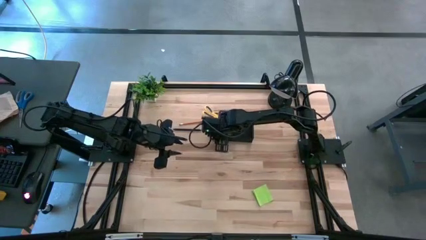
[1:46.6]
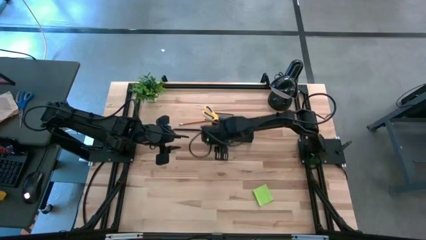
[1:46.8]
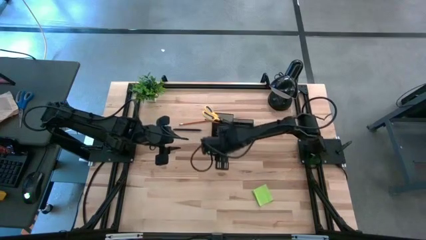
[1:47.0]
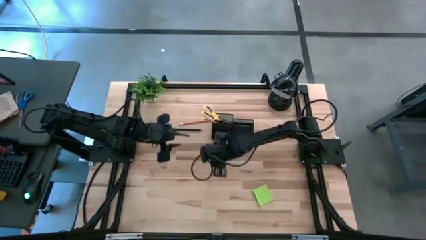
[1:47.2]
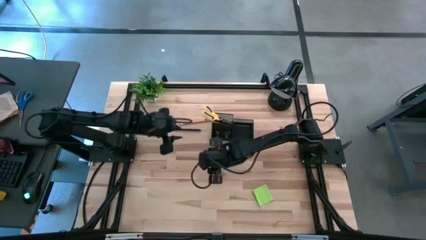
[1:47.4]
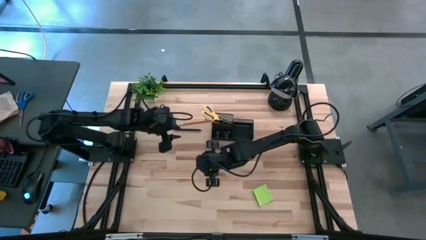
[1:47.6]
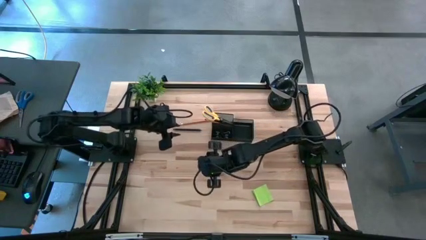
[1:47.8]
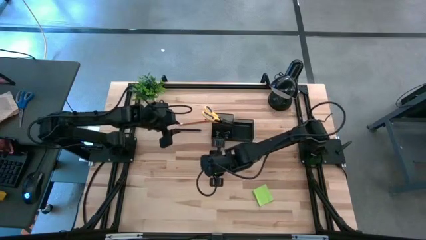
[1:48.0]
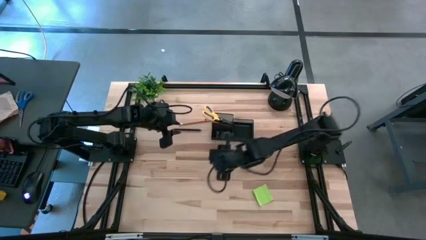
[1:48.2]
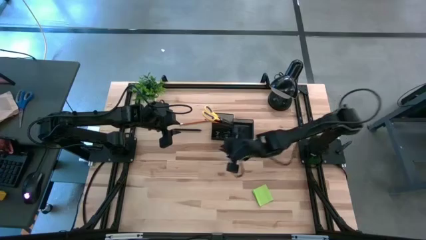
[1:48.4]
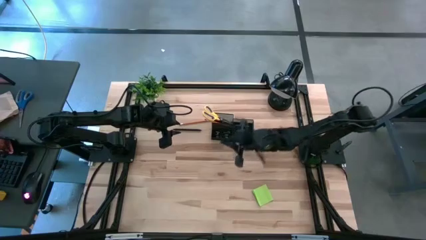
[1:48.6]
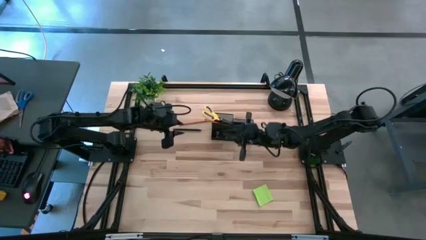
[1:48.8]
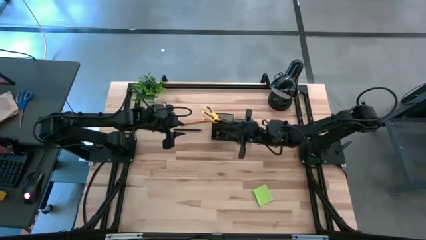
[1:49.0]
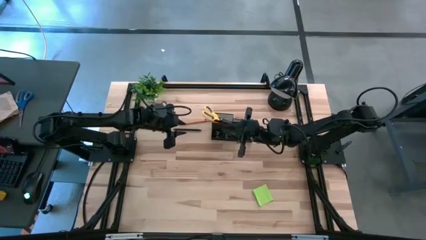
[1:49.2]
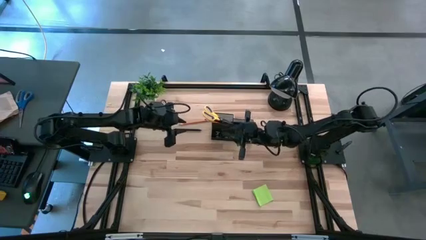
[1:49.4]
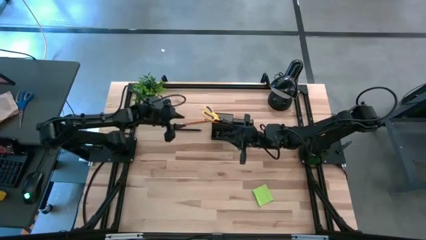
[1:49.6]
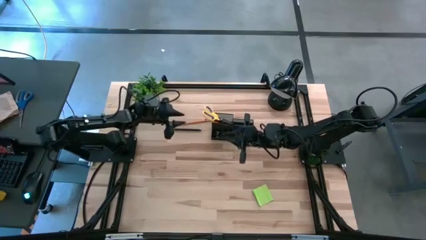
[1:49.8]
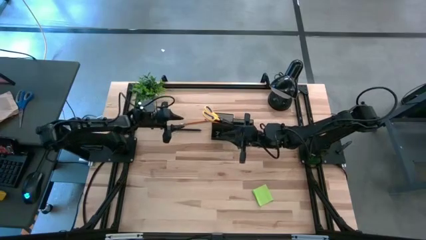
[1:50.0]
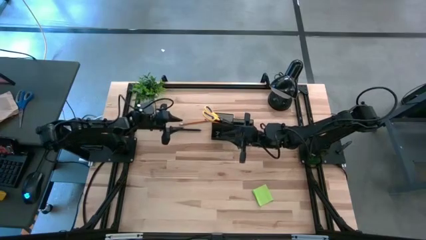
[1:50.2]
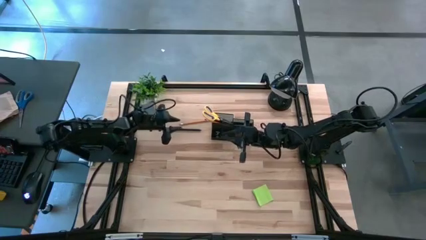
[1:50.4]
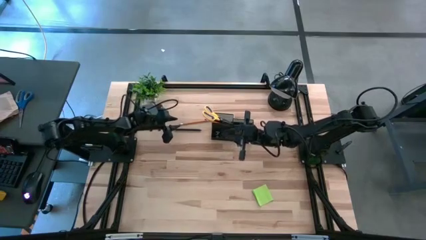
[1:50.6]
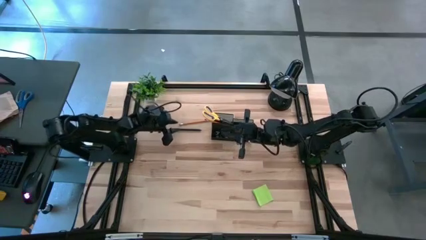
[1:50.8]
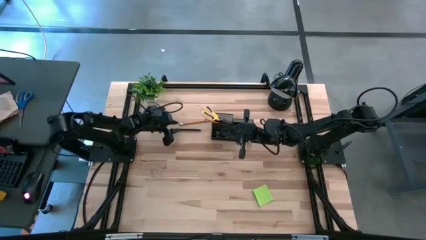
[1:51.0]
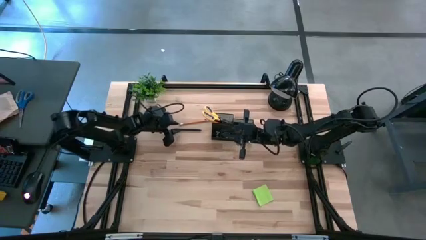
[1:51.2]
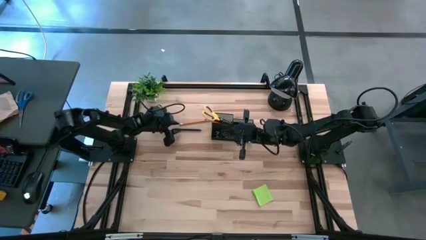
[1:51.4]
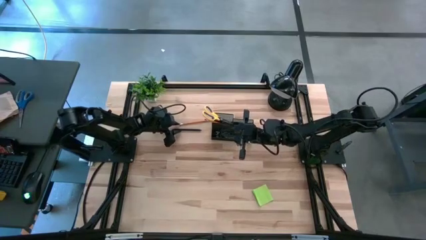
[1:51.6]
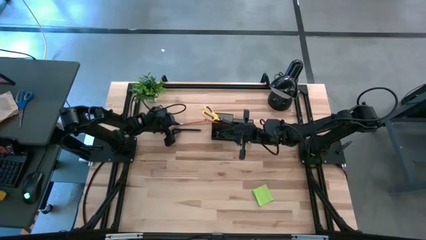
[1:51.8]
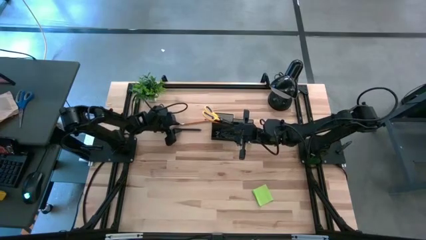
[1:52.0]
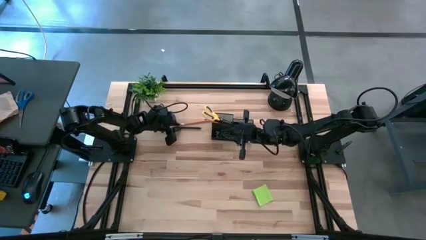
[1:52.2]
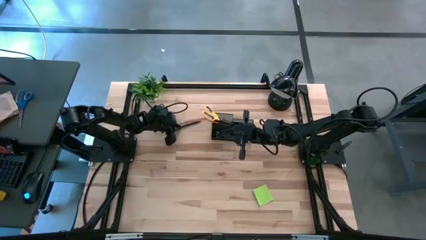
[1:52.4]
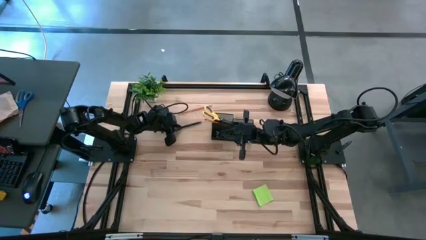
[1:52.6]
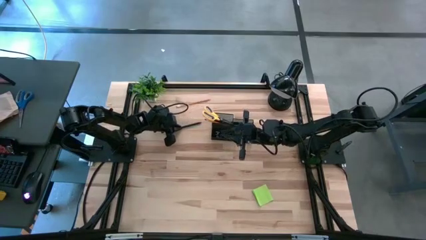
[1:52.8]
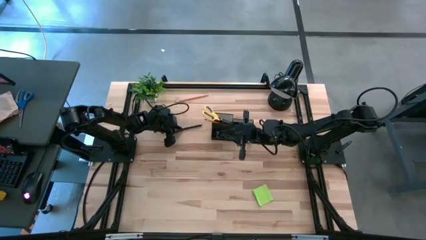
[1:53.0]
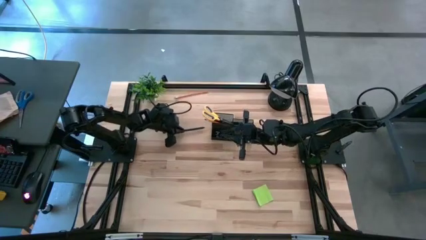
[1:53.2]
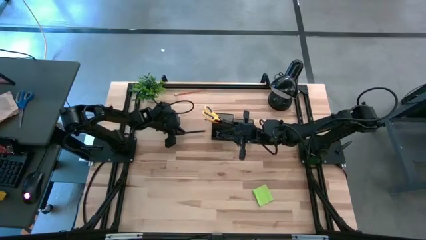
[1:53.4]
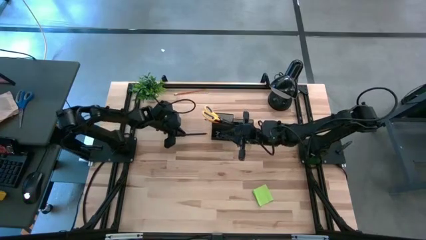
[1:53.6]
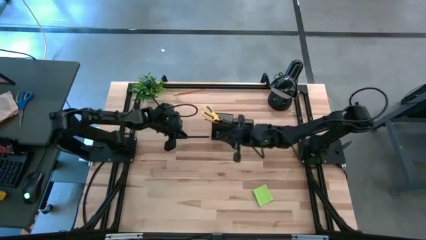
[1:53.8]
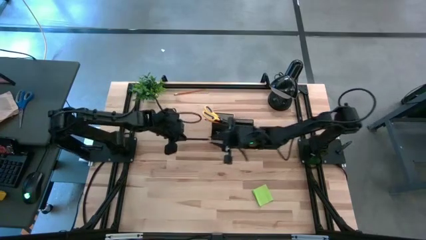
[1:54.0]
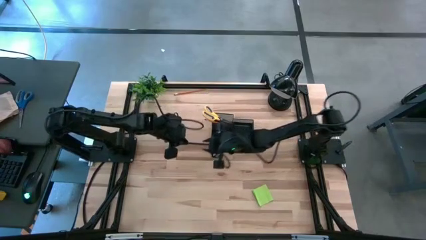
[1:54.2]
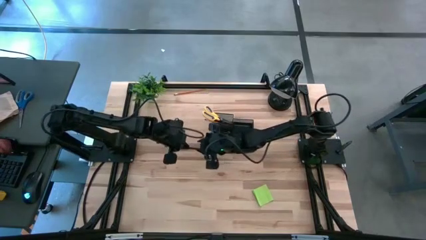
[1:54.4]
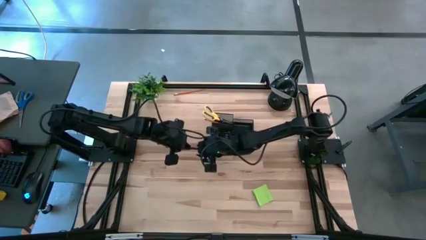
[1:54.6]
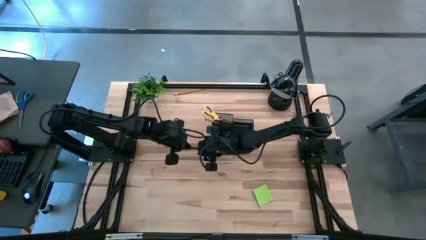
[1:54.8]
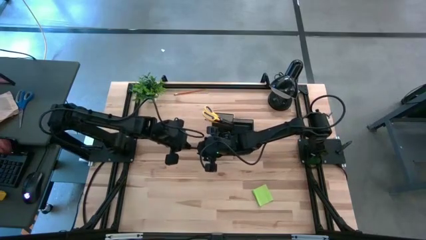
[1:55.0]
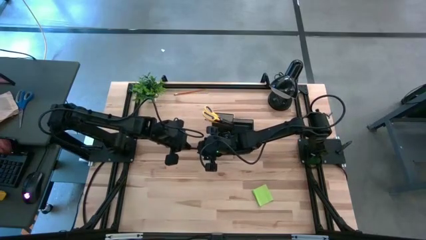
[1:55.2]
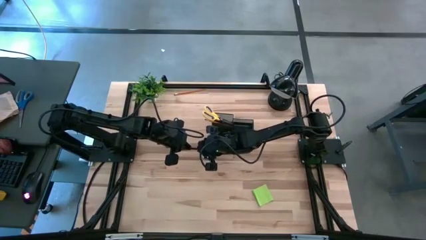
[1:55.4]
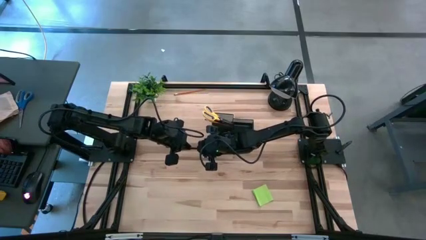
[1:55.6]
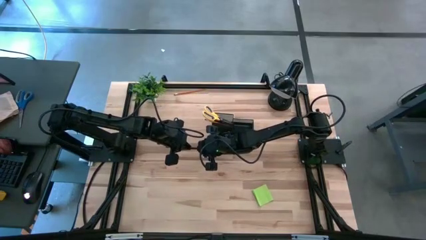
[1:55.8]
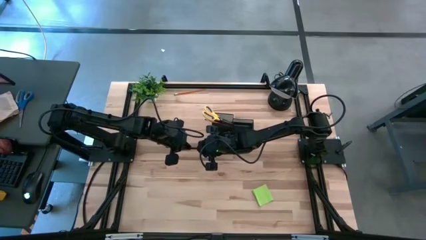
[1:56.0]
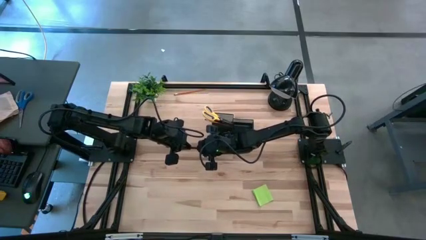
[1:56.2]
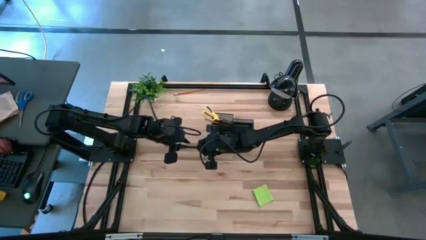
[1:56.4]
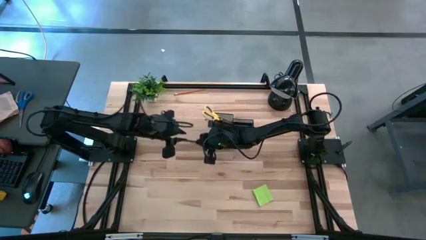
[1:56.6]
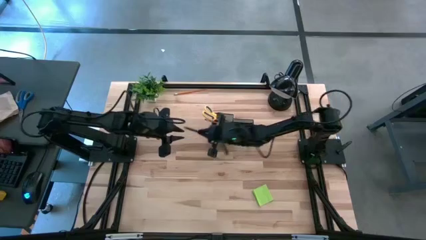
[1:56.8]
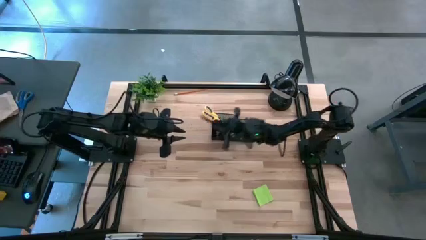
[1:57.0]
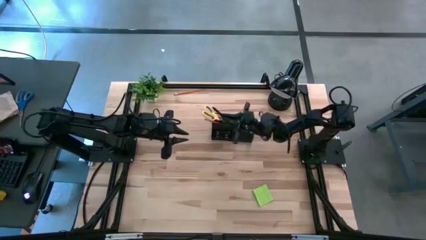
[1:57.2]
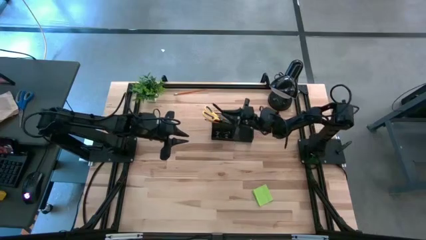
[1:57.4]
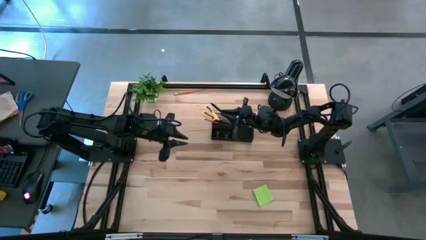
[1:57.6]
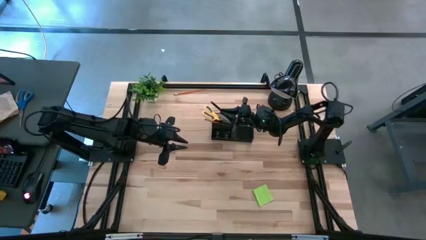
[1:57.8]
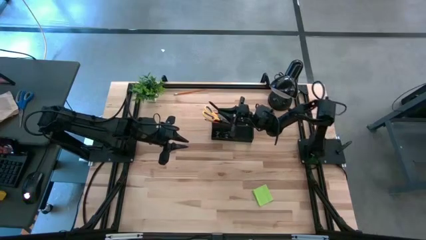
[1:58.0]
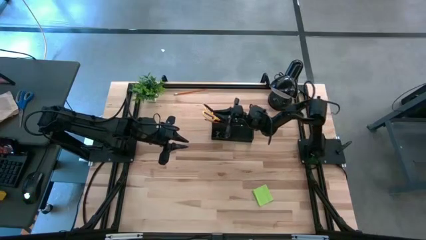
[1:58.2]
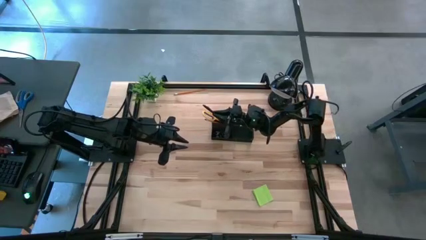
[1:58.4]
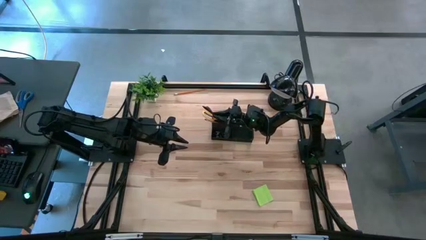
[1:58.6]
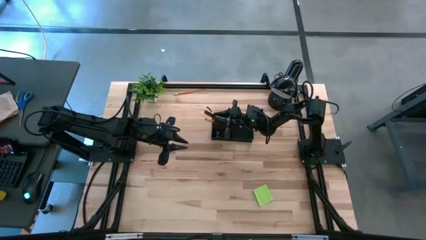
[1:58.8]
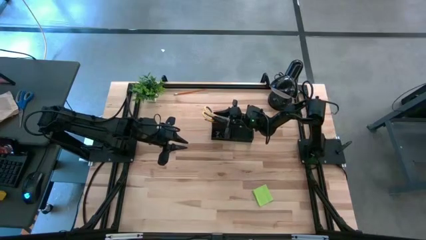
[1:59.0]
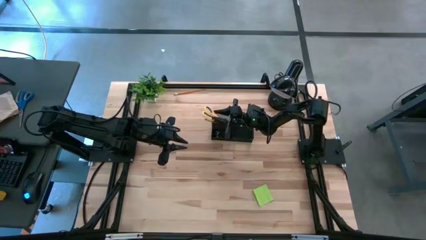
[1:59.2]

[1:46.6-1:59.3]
Task: Pick and place office supplies into organizer
Put the black pen into the desk organizer

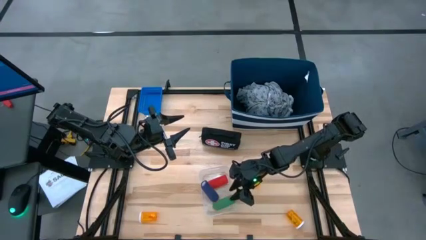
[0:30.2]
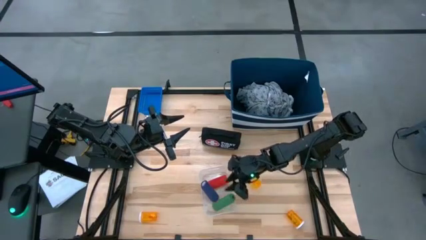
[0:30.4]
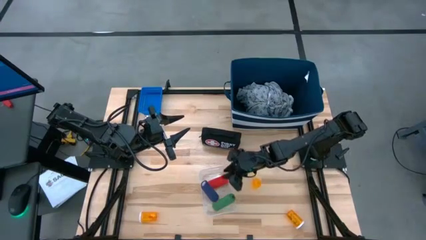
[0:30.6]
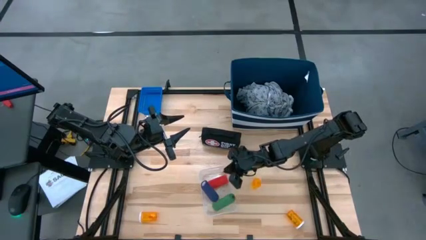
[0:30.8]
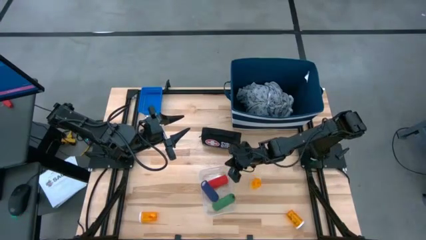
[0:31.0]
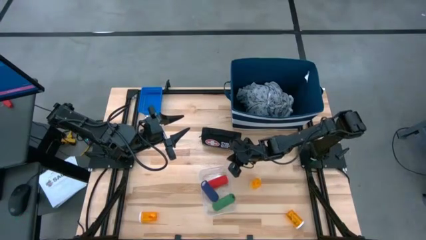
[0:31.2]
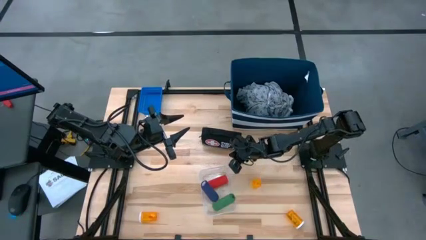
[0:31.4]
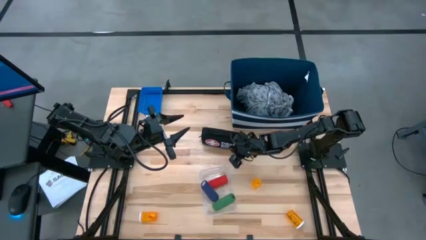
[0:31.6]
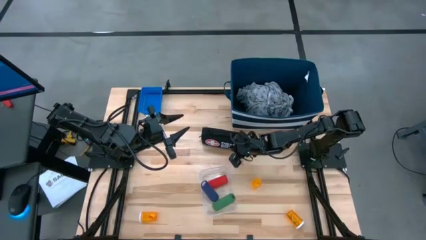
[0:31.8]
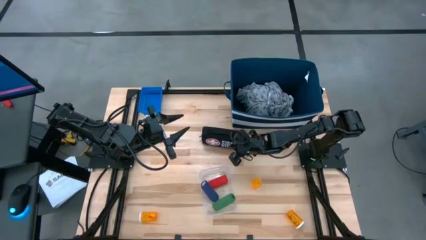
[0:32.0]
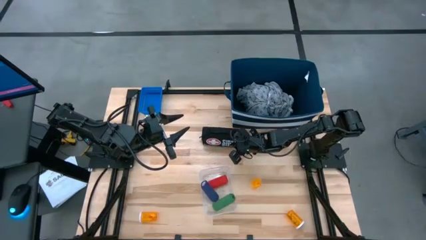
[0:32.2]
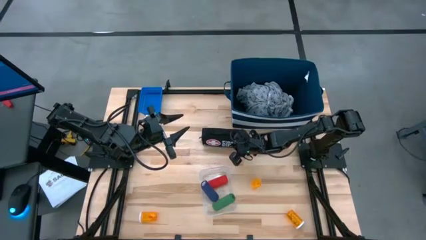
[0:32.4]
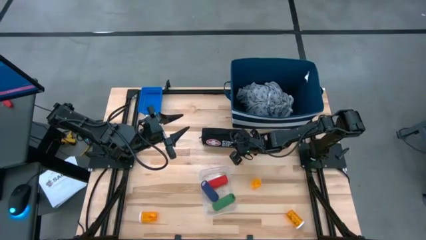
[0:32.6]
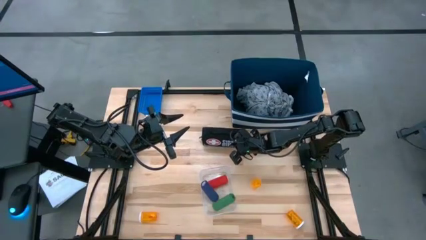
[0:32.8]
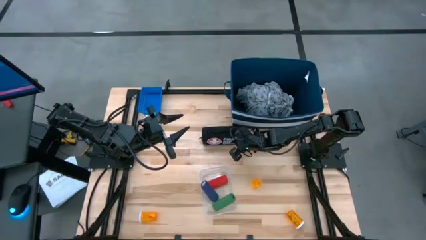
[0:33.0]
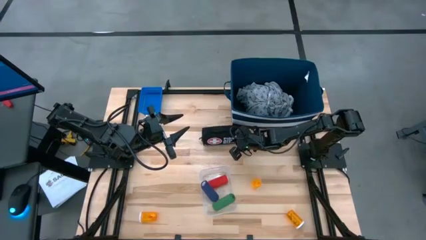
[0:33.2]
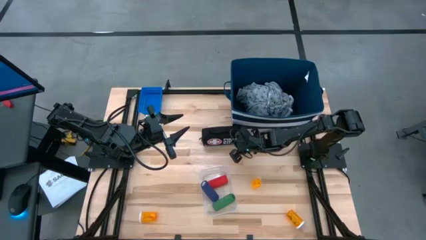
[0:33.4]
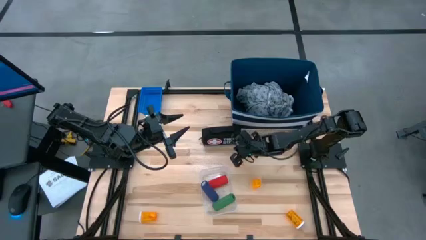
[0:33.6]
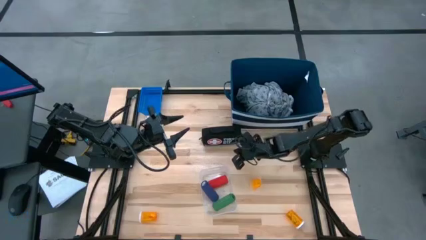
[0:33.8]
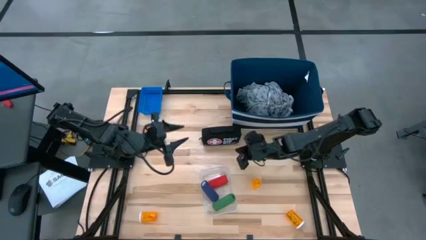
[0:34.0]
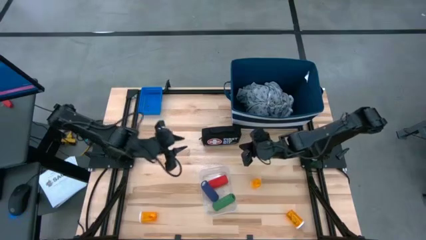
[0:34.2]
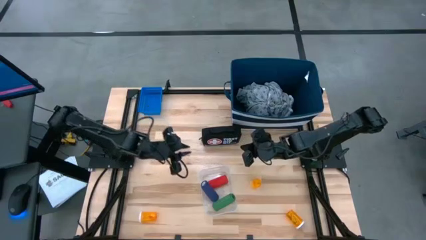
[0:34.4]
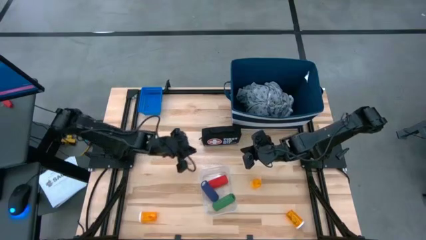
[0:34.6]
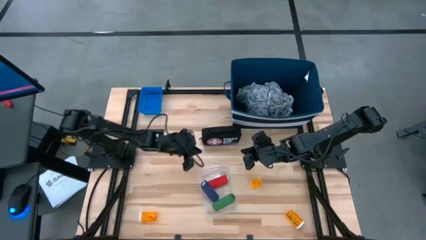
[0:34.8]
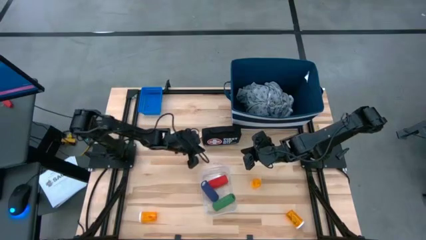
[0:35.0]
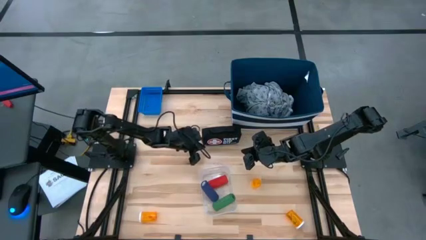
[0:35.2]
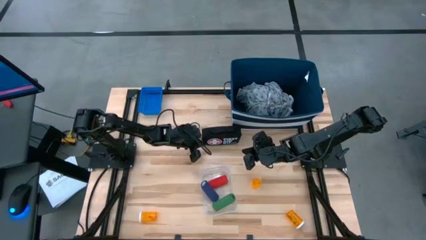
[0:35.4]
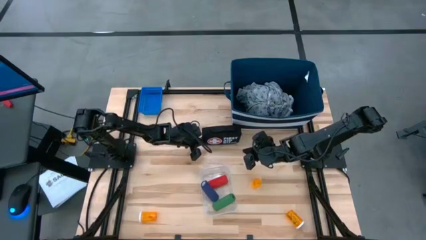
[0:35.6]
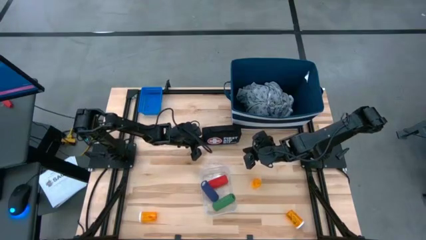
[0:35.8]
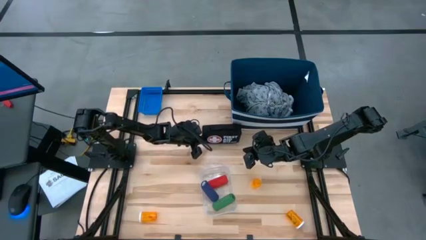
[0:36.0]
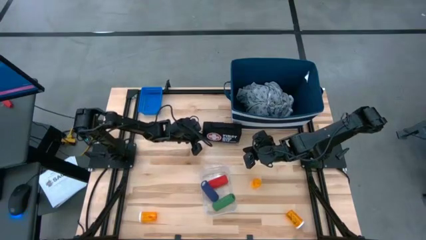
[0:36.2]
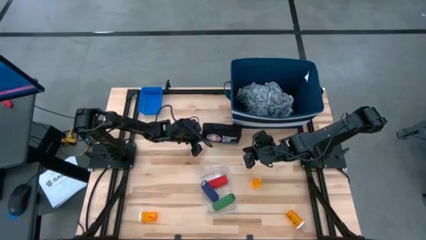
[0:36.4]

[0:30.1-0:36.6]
Task: Pick & place medical supplies in basket/bin
Adjust the first aid kit
